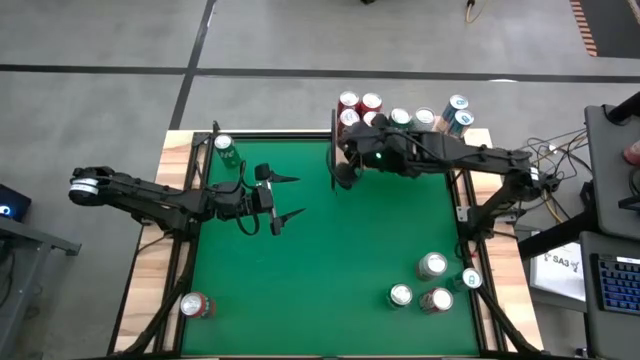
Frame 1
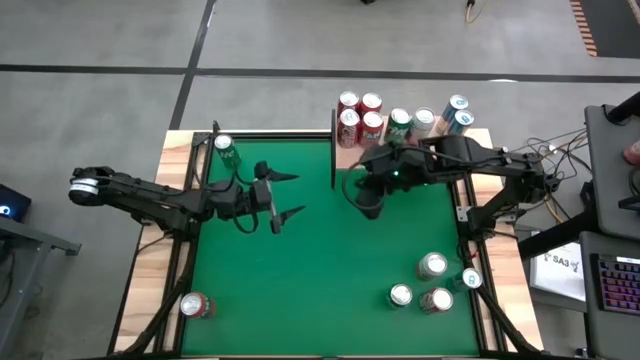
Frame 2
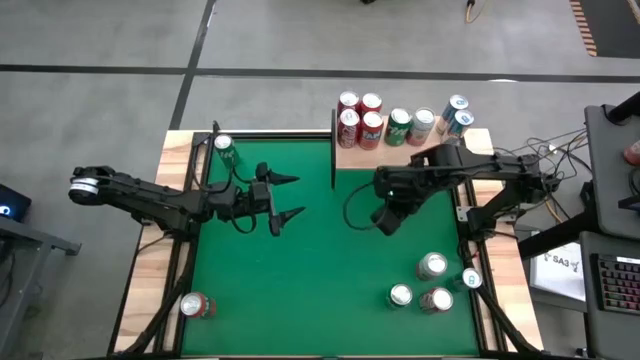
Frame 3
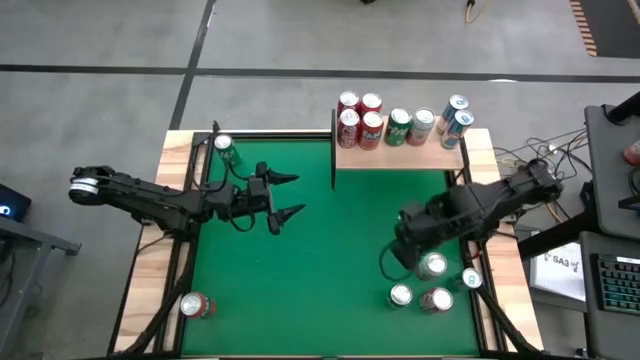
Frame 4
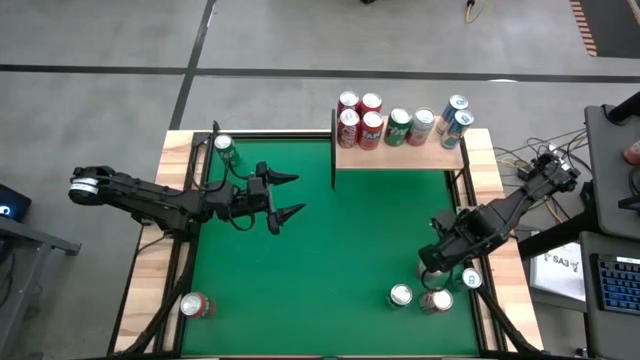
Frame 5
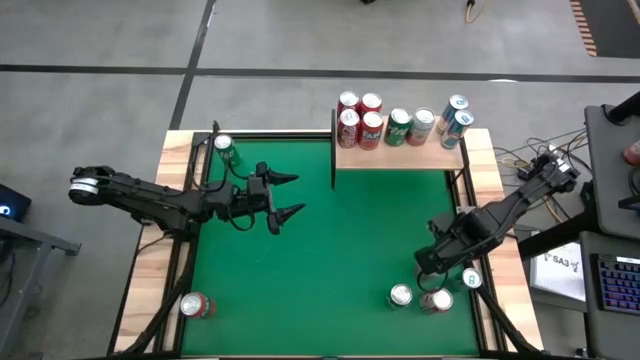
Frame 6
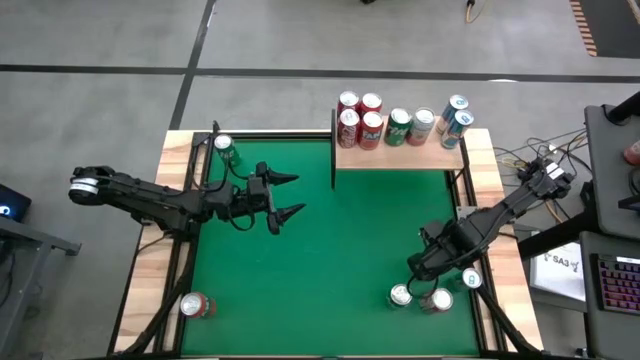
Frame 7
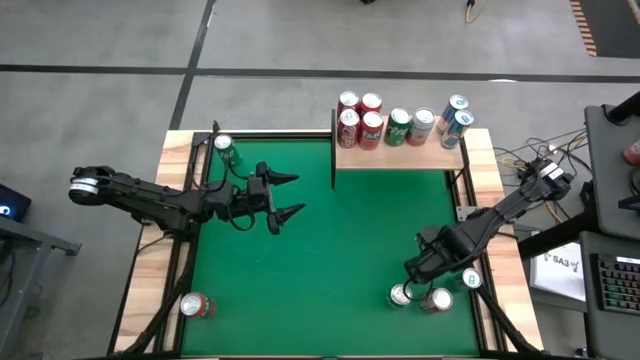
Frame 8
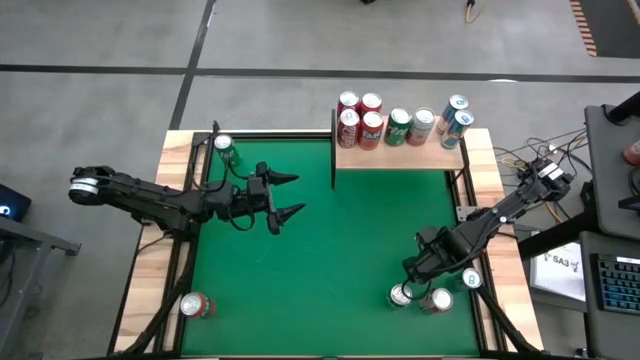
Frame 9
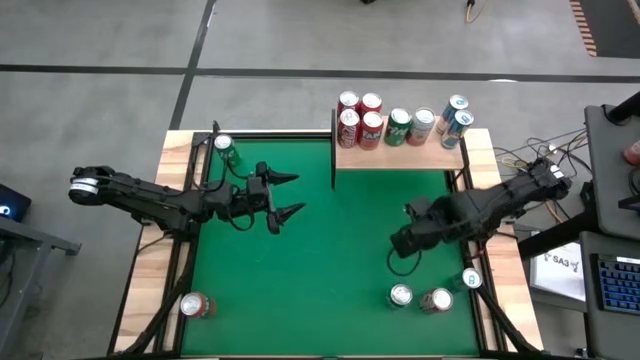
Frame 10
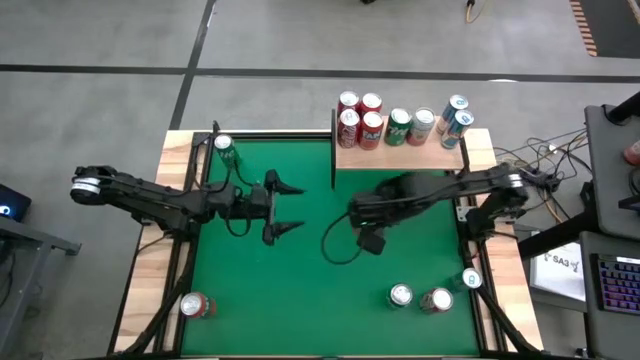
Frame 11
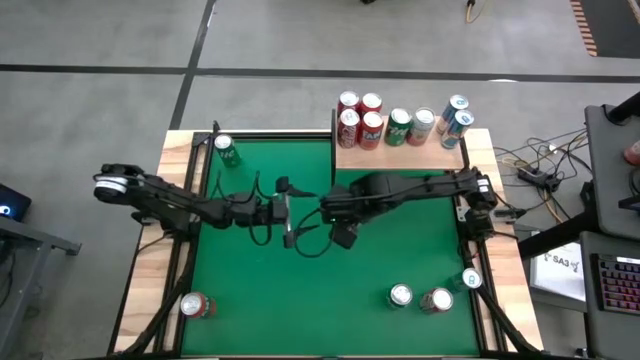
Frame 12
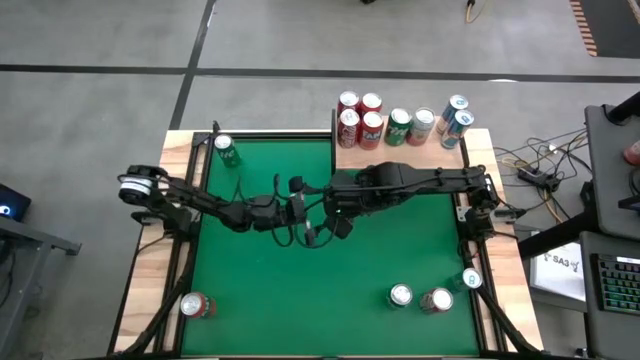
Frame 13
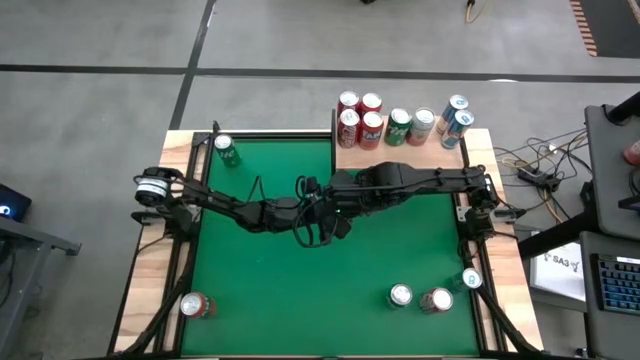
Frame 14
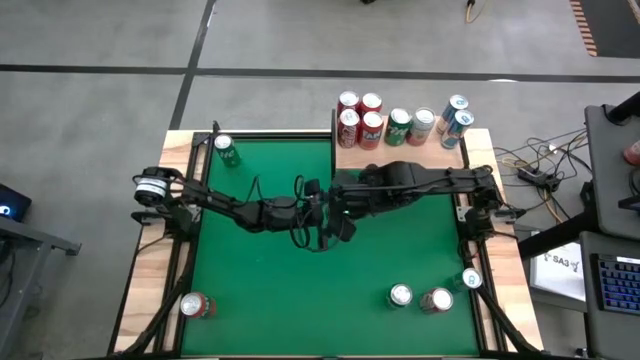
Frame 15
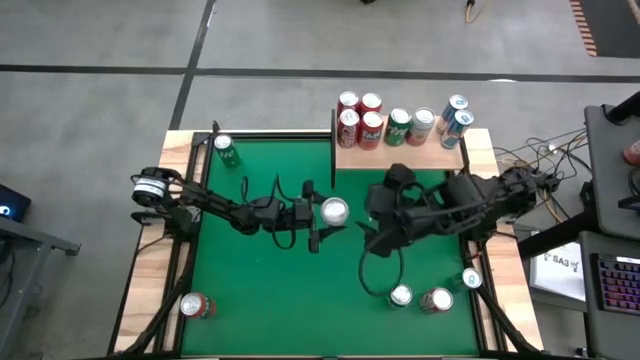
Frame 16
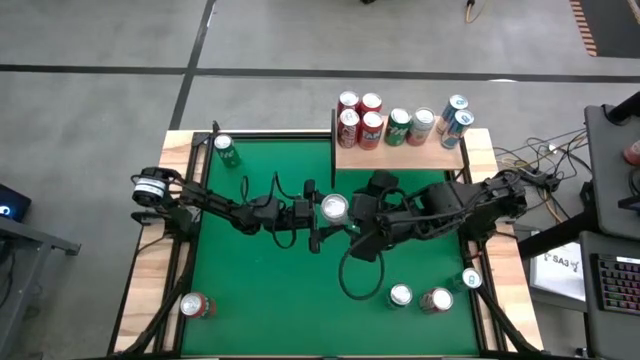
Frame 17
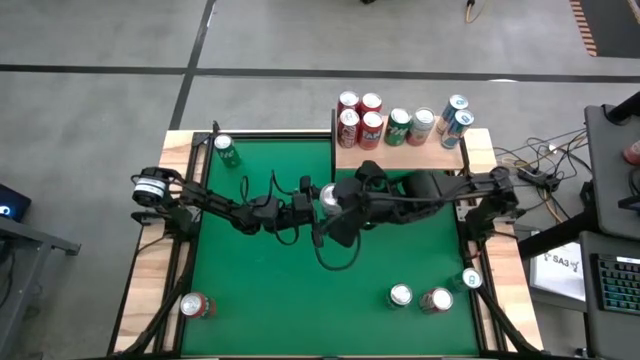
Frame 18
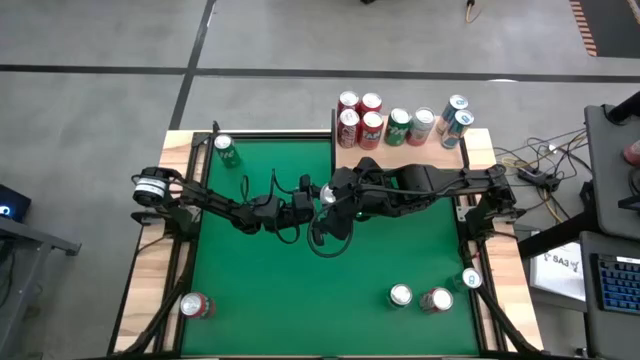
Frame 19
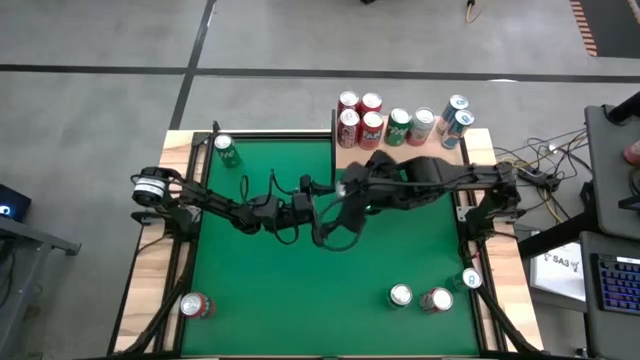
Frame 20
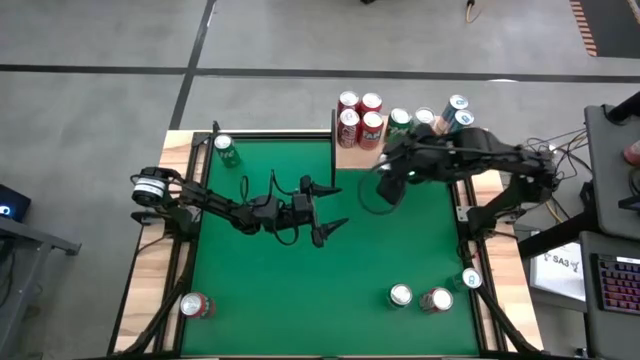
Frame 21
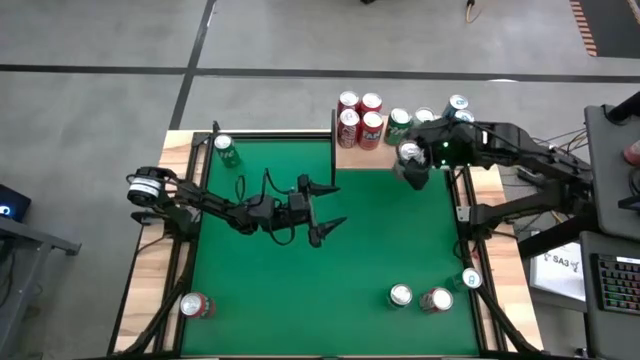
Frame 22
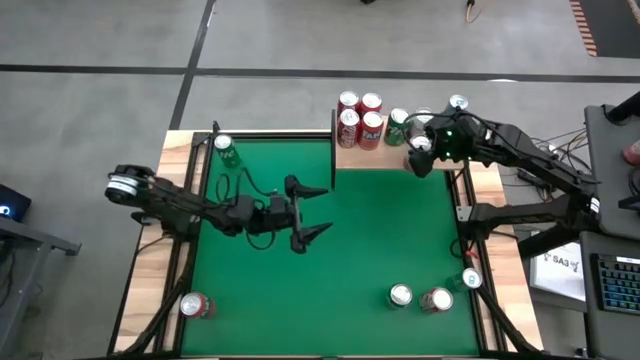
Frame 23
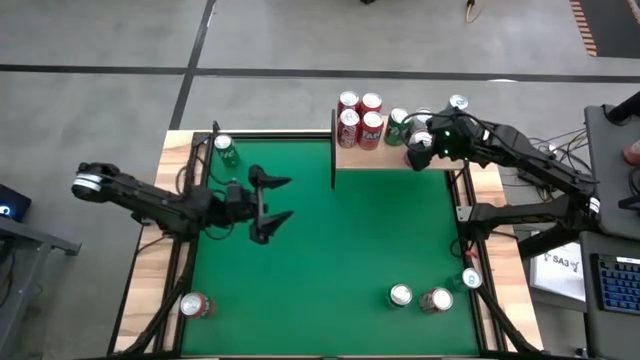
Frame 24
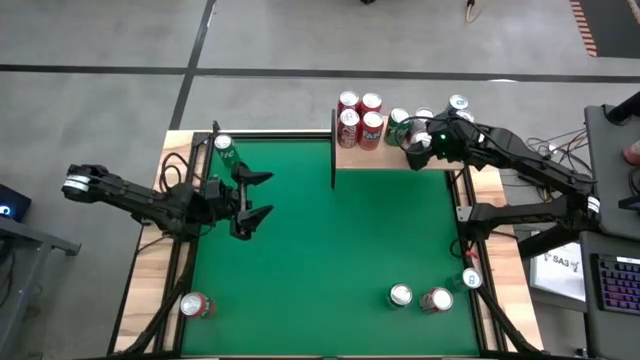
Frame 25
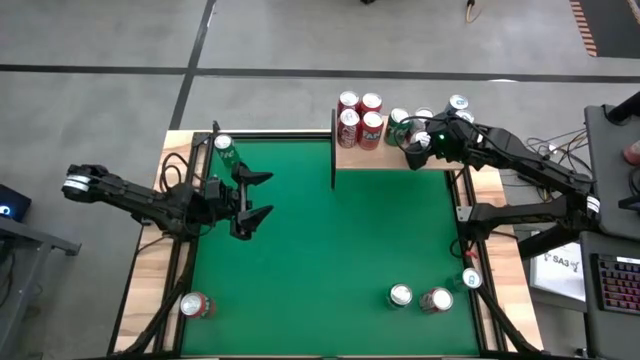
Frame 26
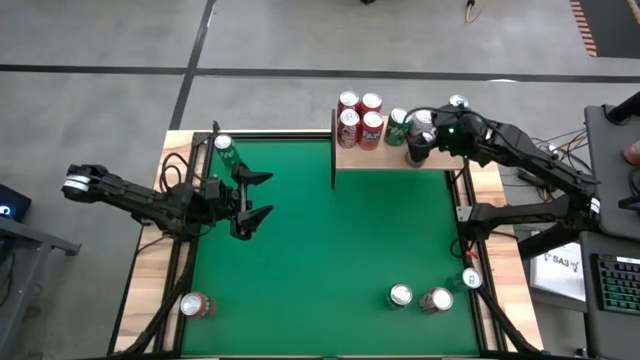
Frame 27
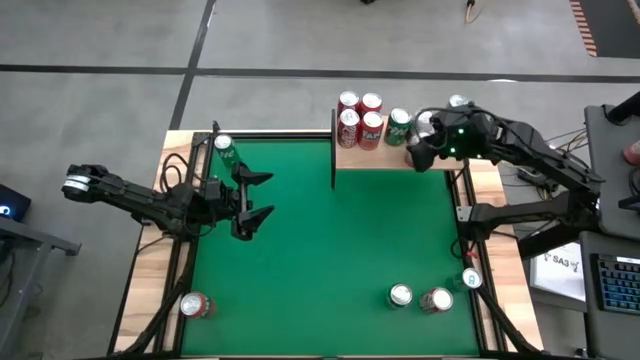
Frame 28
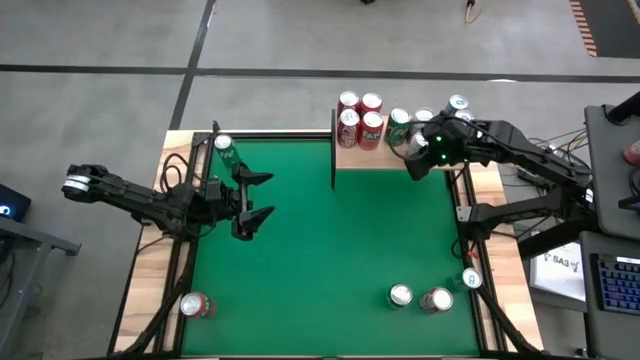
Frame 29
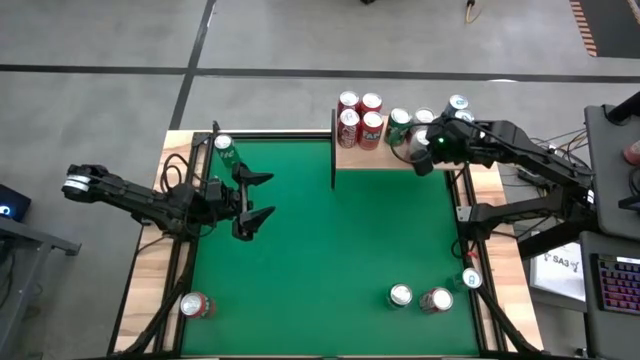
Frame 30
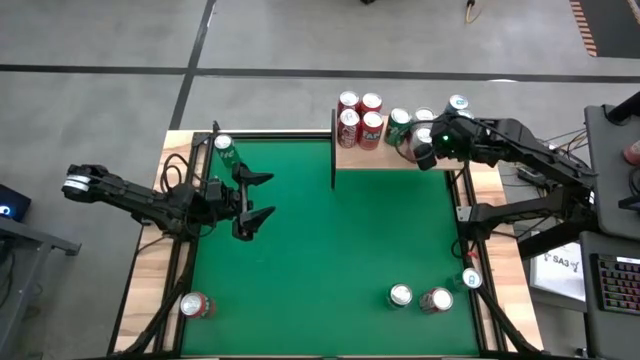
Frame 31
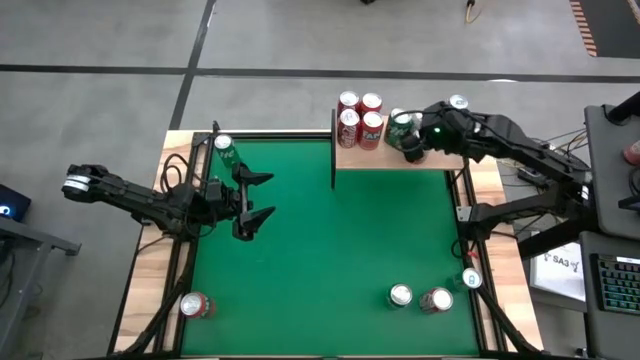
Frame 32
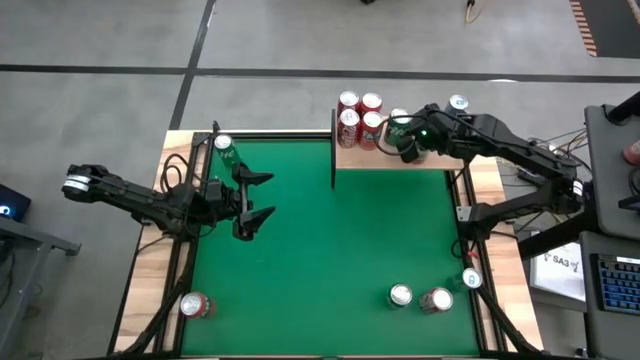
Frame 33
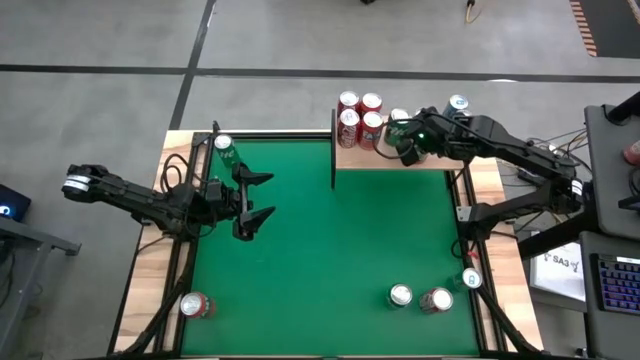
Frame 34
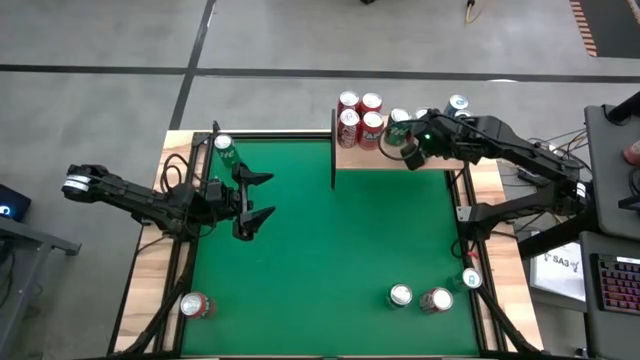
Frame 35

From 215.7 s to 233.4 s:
Task: Place canned beverage on shelf
Put the pink-white soda can on the shelf aligned with the other pink-white soda can

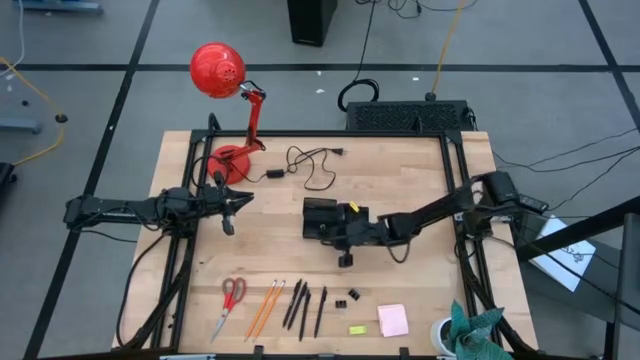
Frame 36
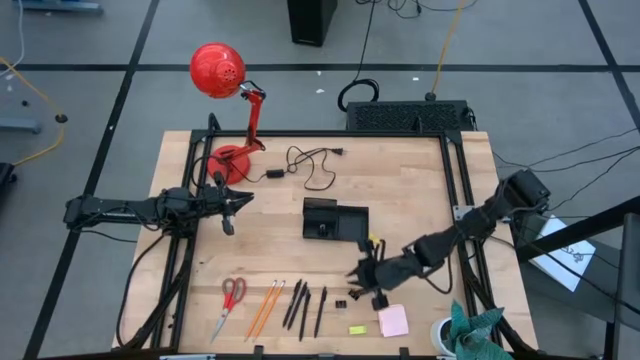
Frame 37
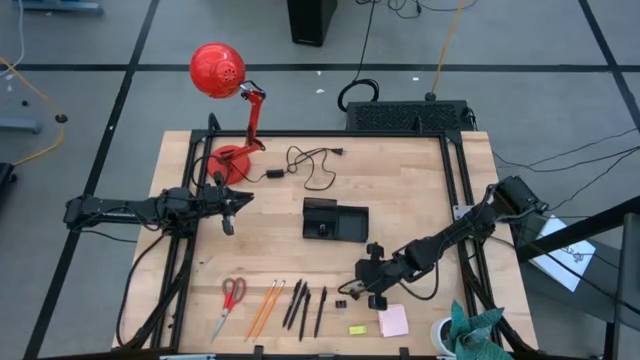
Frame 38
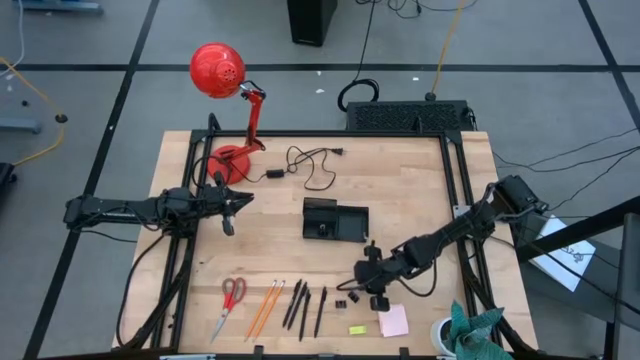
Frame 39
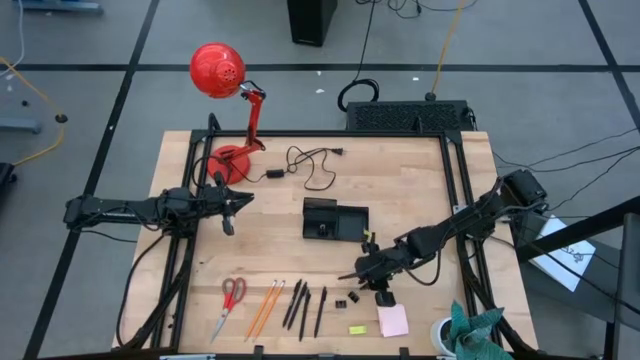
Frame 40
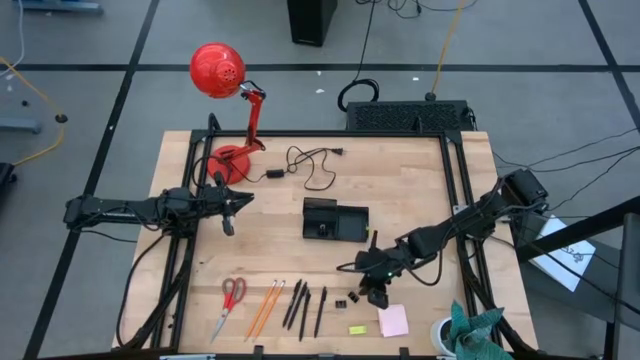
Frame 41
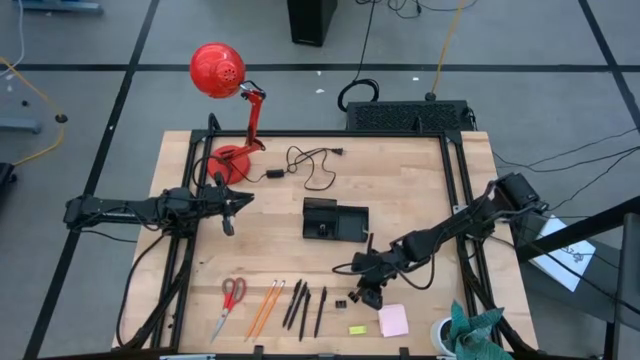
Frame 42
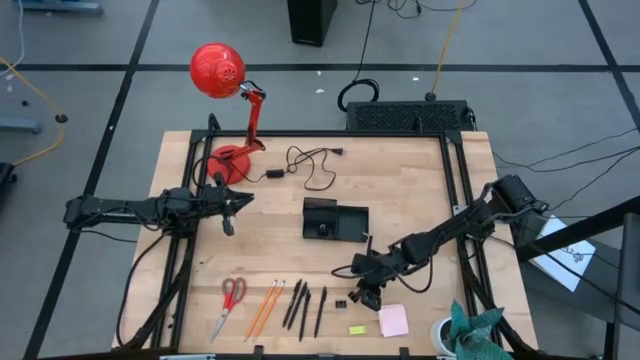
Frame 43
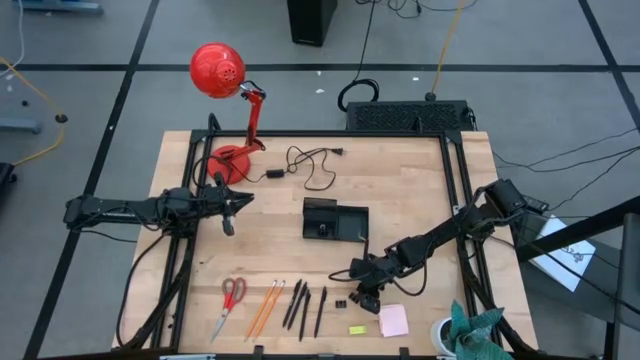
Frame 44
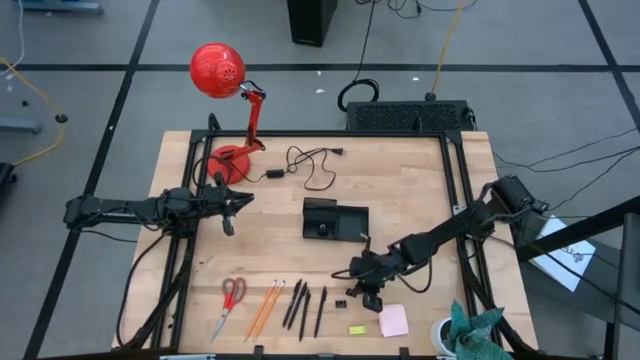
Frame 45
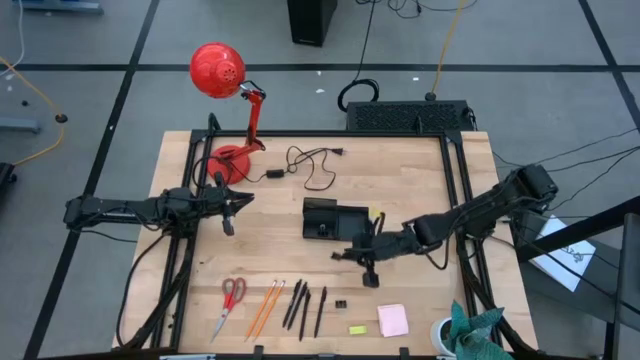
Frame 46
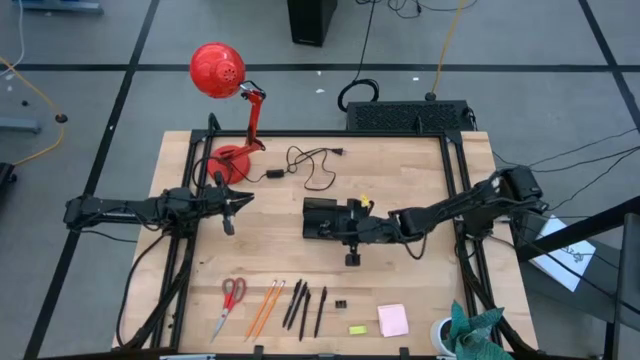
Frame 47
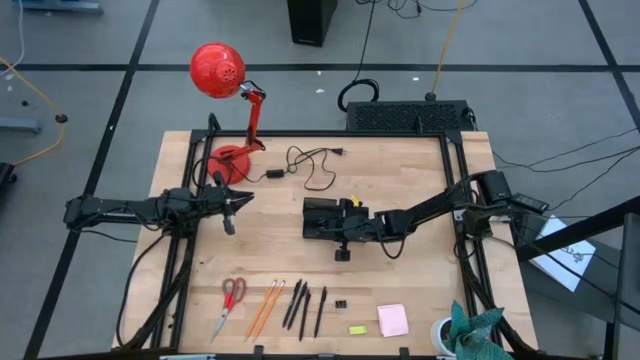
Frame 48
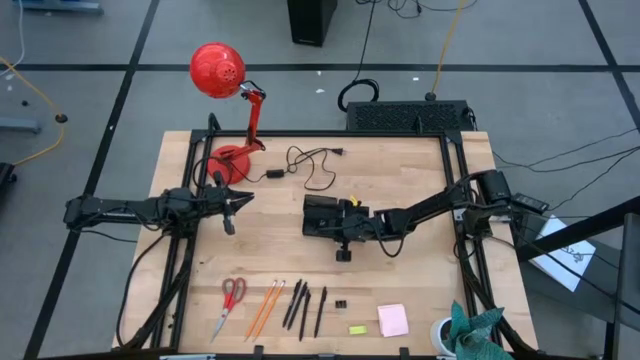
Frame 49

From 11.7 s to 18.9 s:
Task: Pick and place office supplies into organizer
Put the right black binder clip into the black desk organizer
